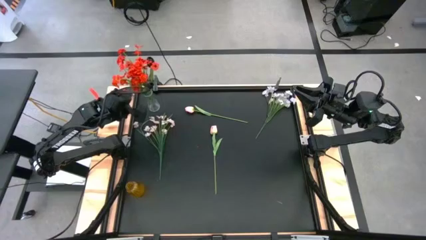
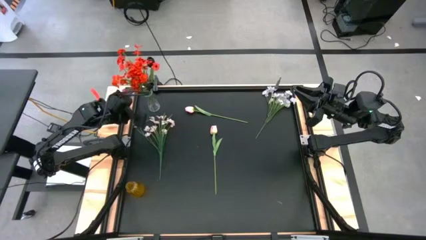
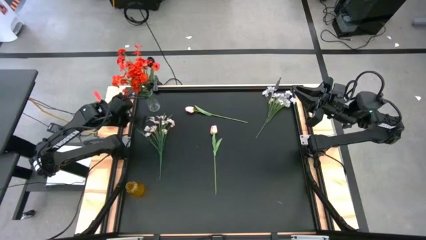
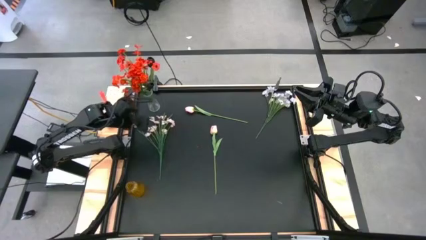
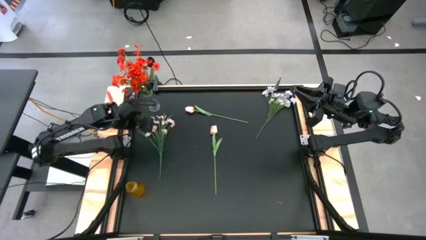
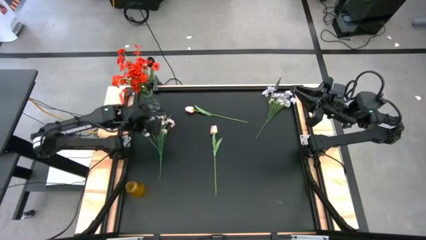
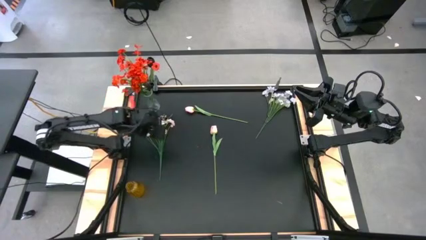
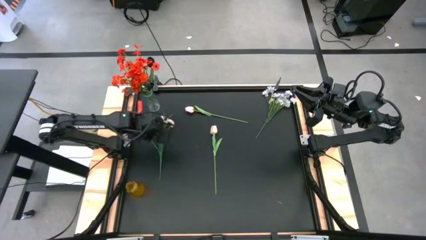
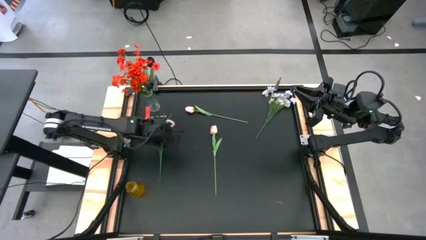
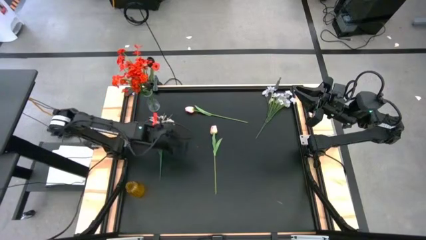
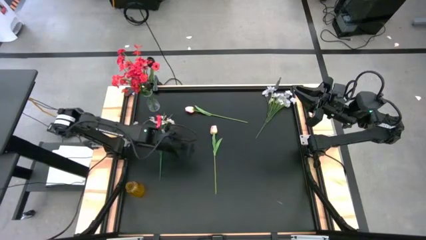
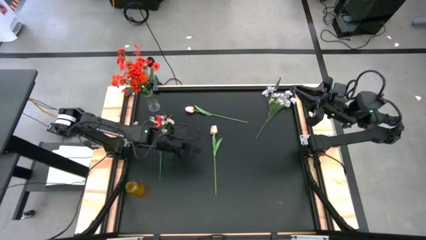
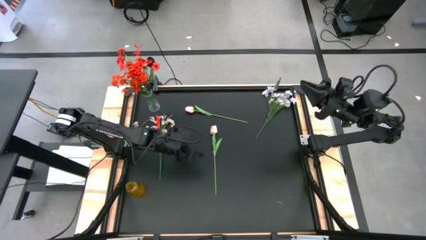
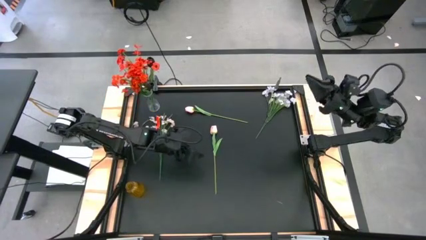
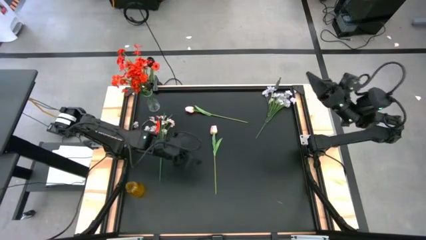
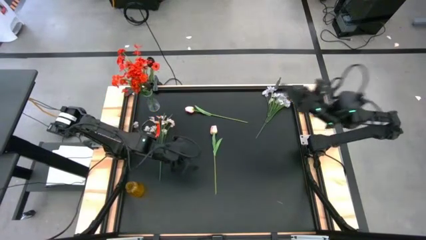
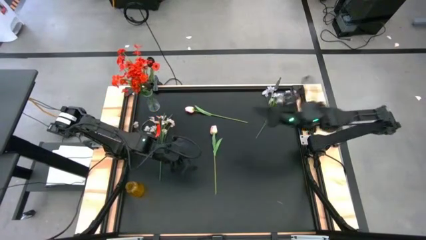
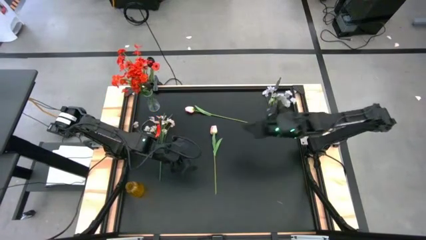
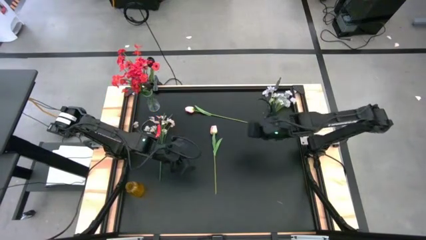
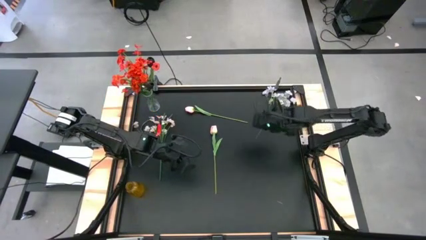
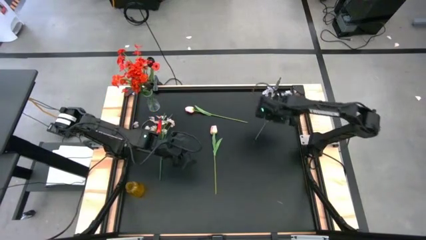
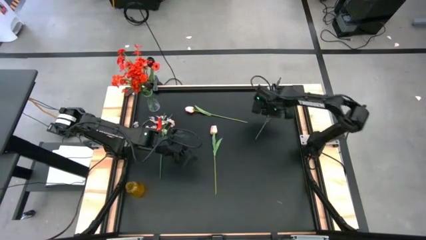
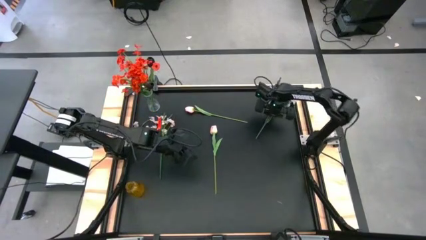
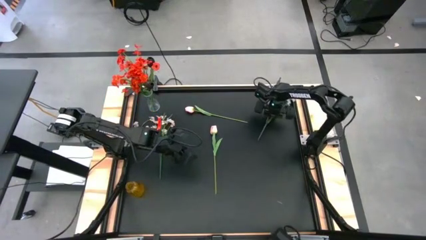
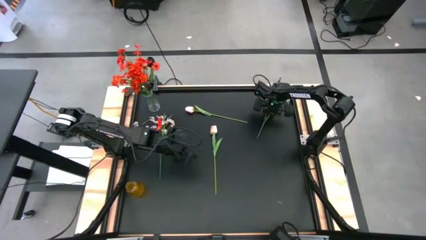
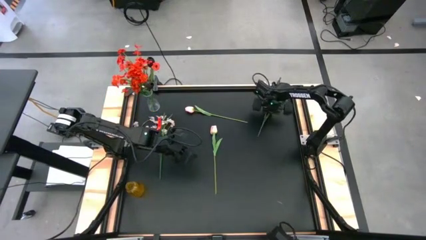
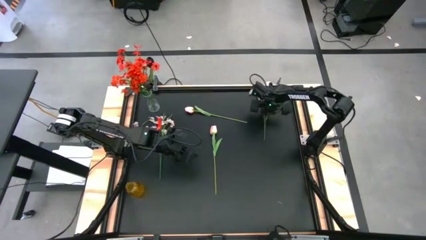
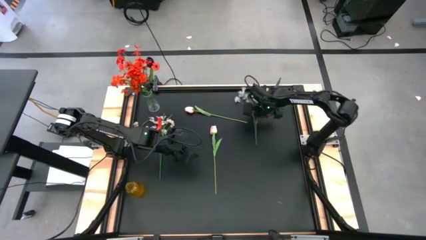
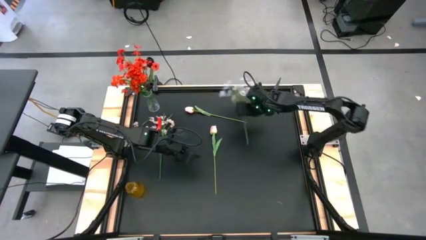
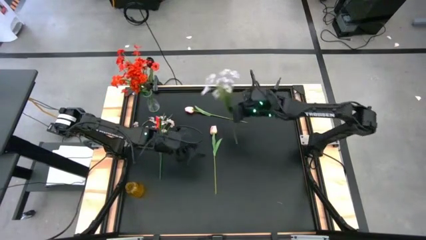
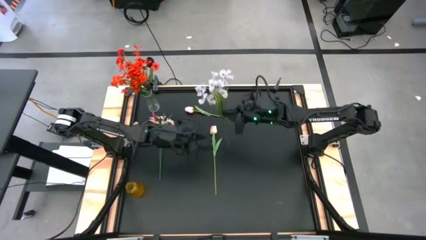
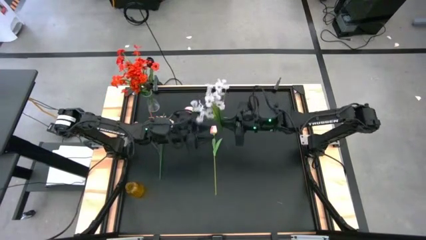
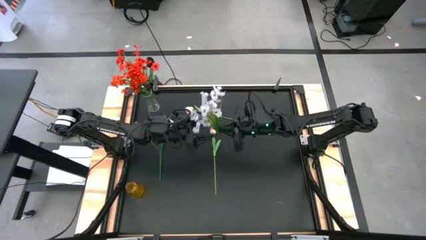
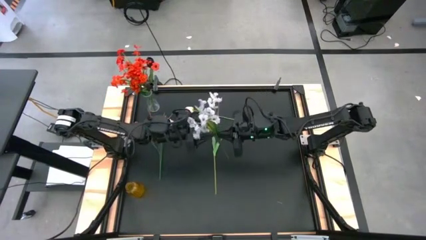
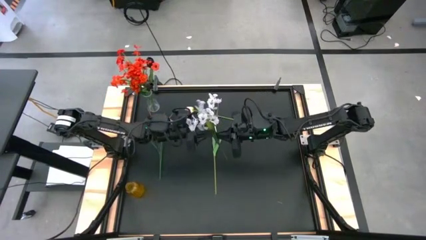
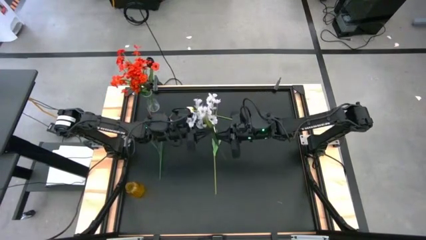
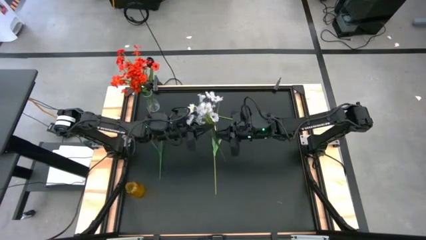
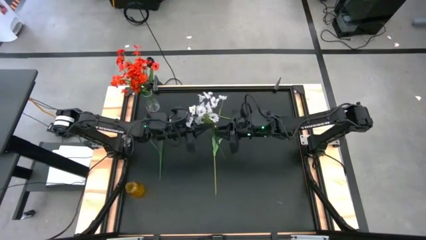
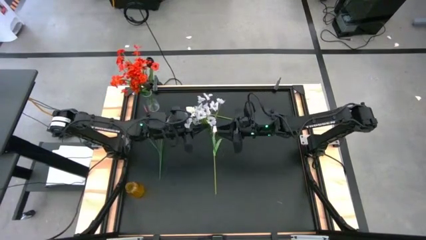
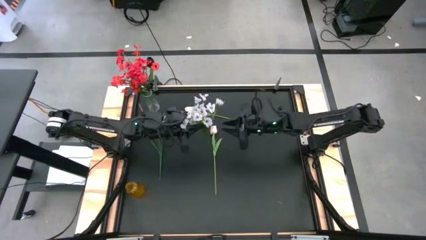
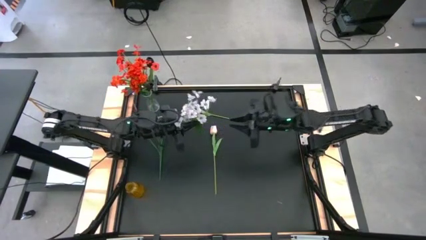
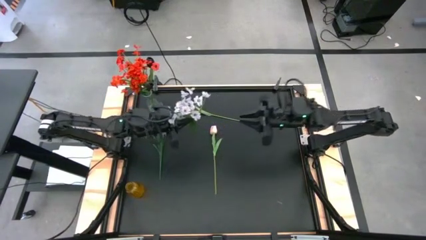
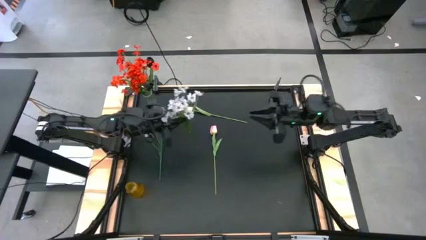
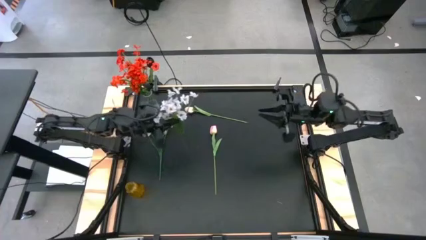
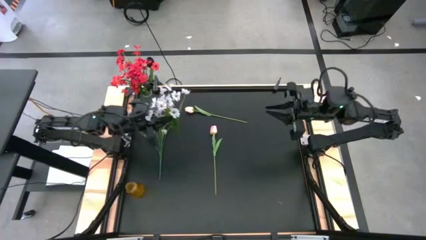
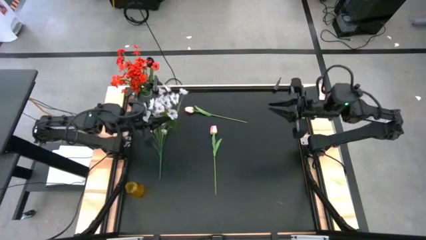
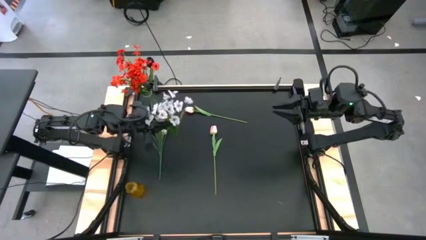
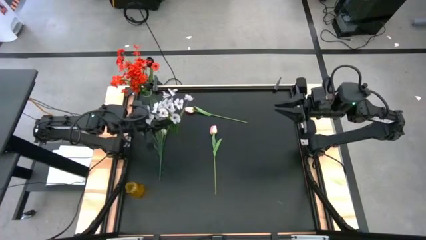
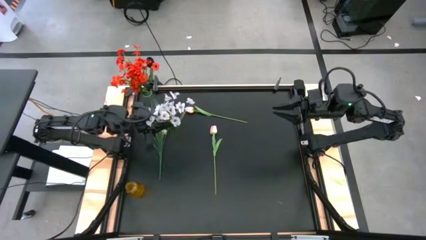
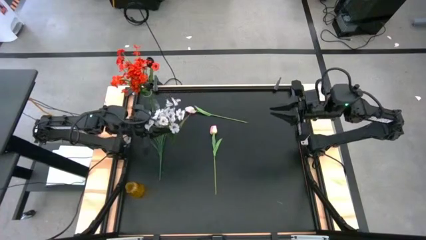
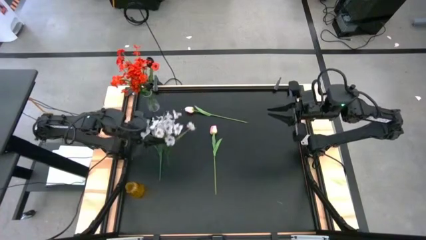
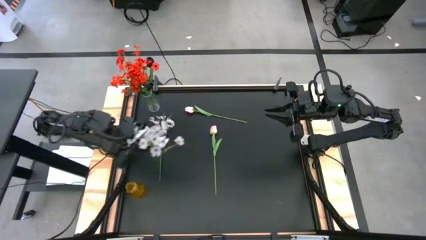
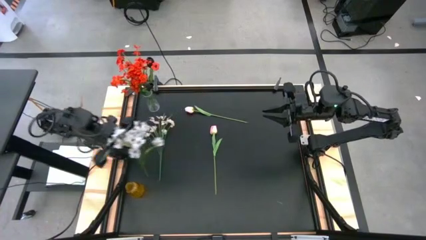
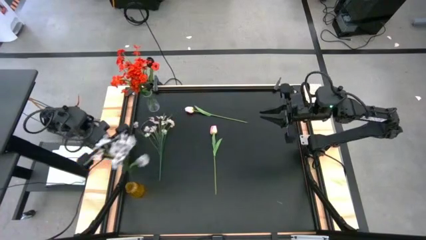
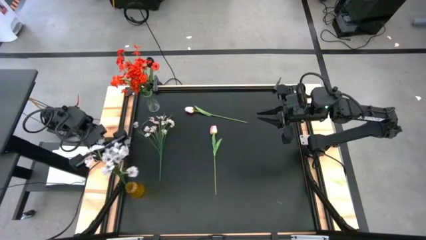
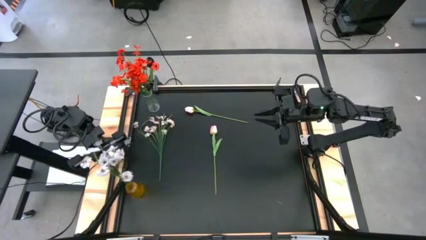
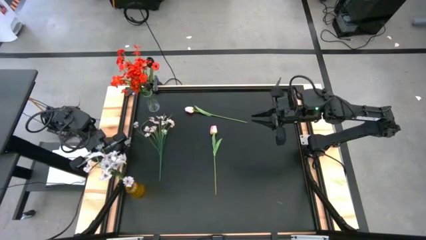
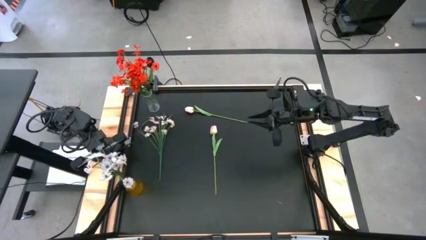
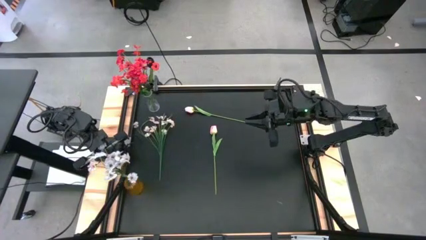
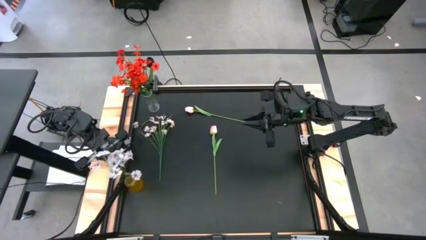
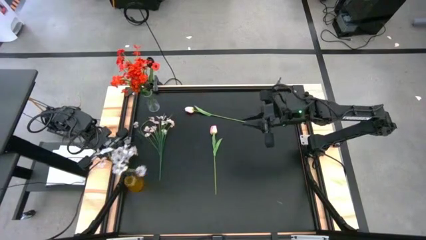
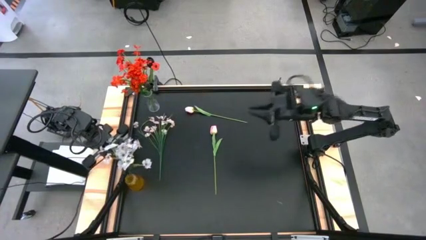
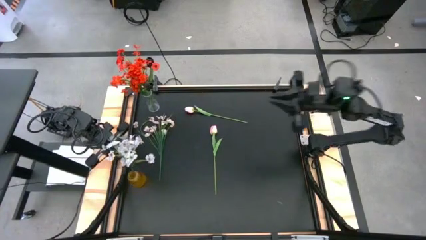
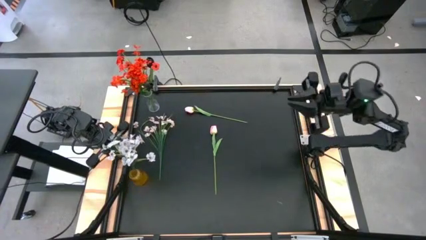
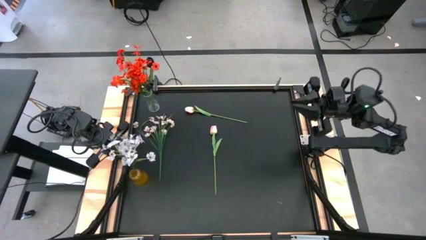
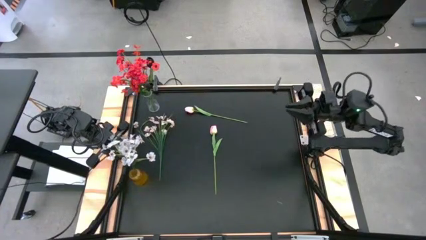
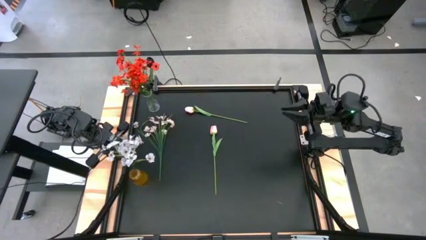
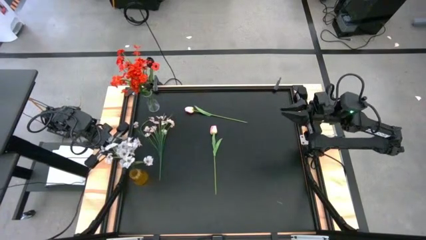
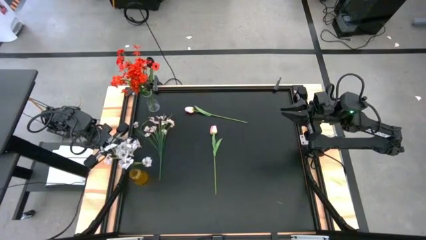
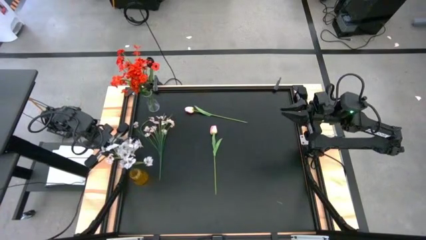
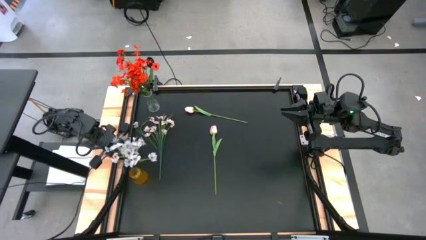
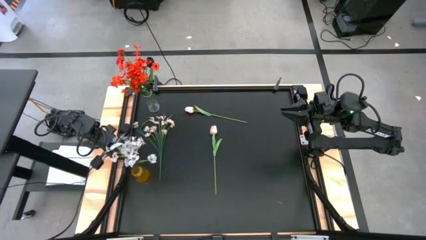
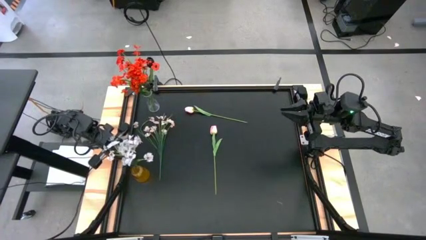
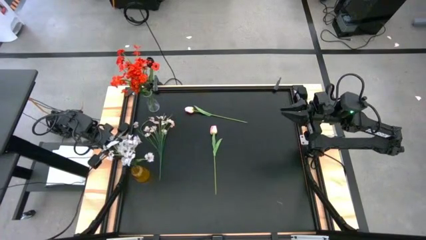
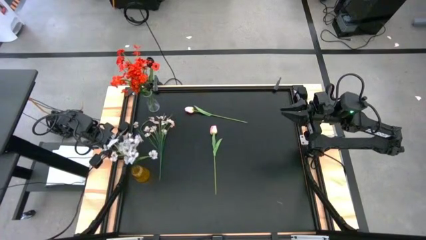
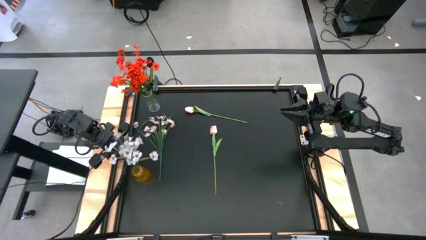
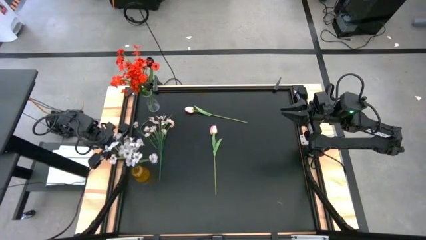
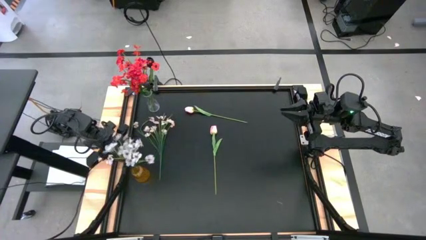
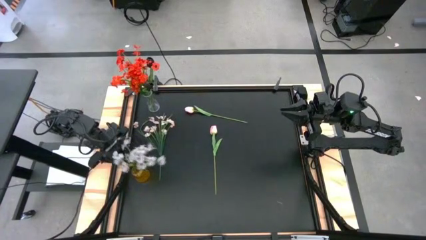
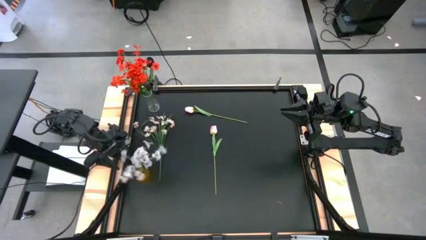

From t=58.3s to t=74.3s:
Task: Sort flowers into vase by color
Put the white flowers into the yellow vase

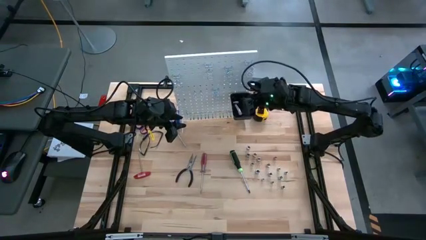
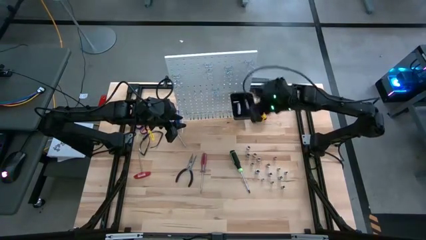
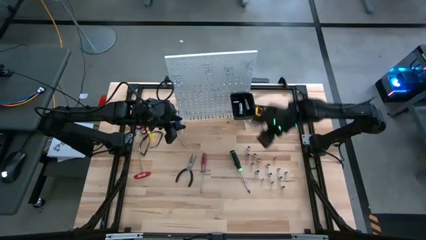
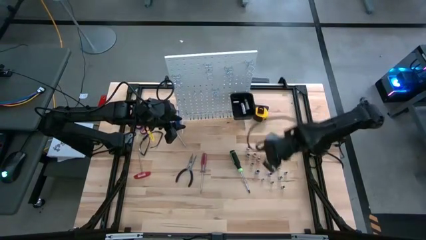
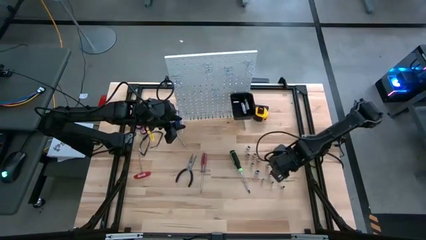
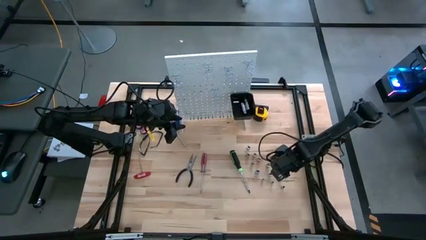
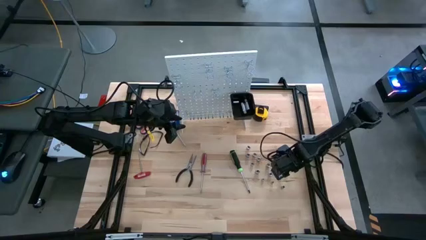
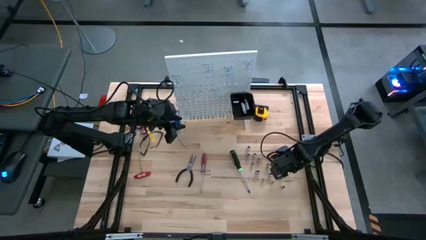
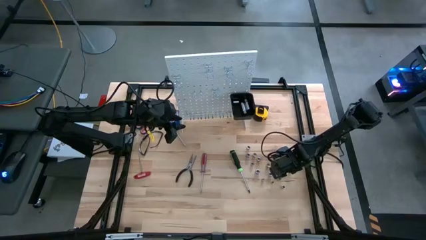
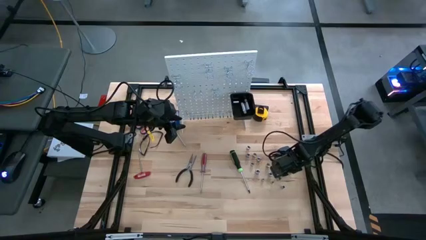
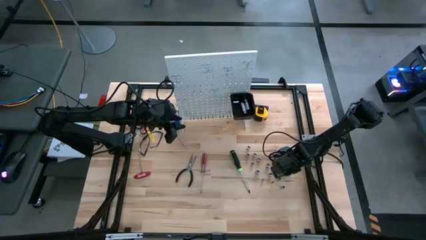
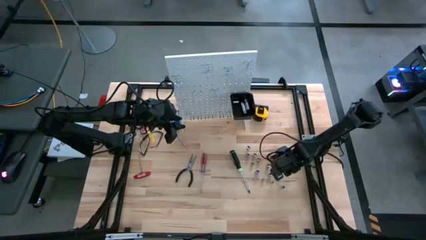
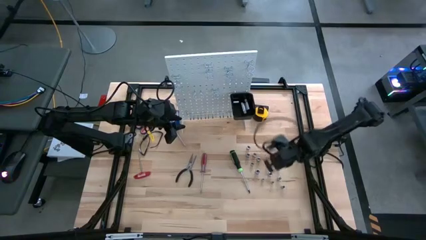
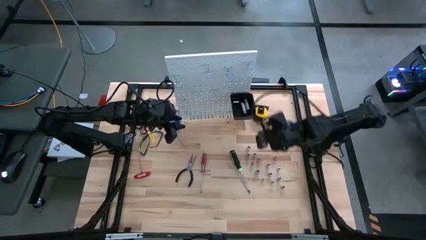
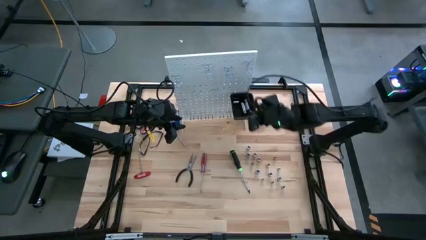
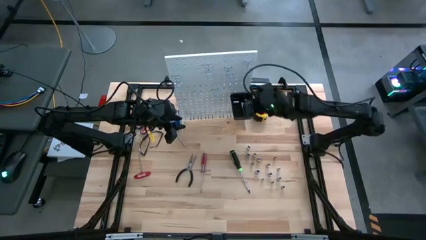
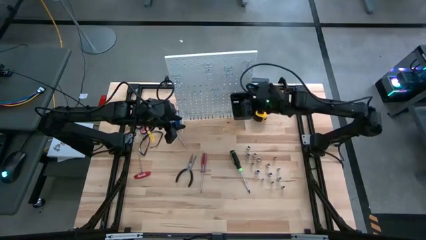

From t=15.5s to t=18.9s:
Task: Hang tools onto peg board
Put the silver socket into the black bin on the peg board
